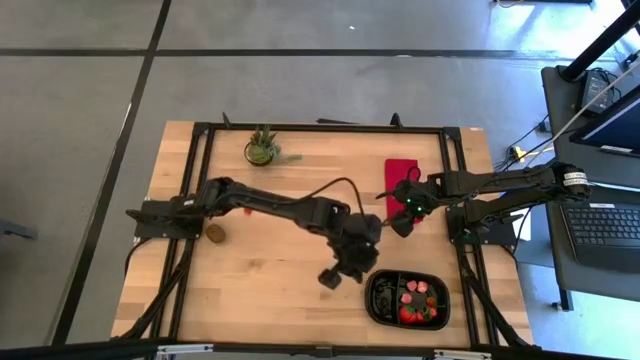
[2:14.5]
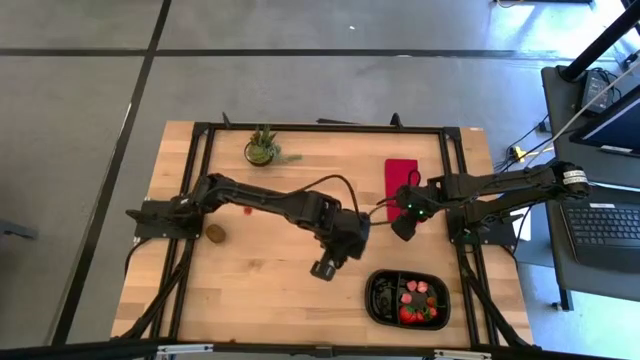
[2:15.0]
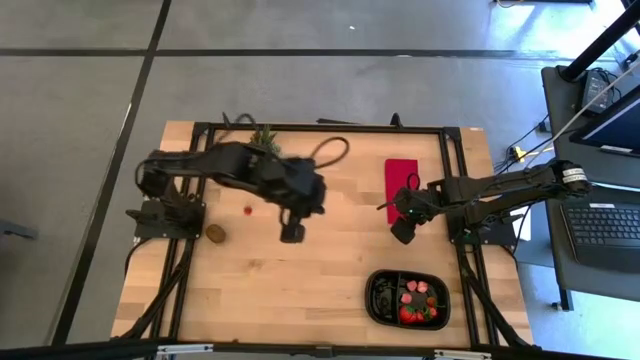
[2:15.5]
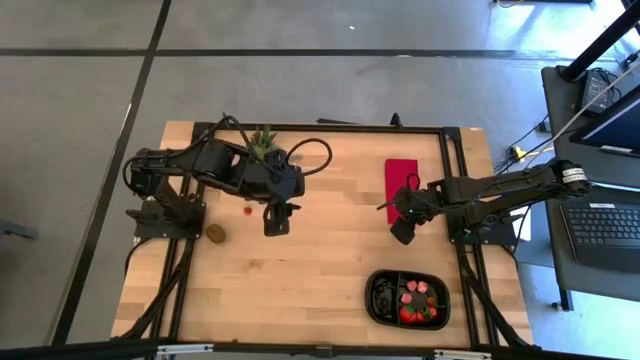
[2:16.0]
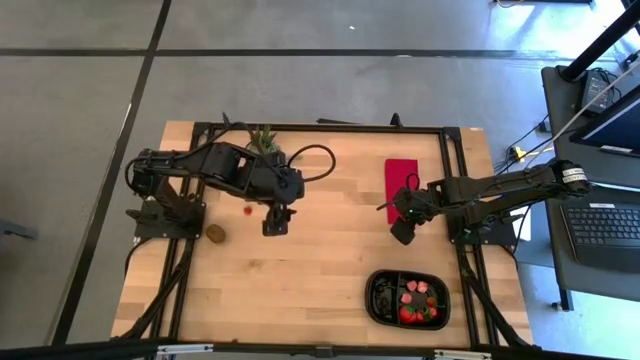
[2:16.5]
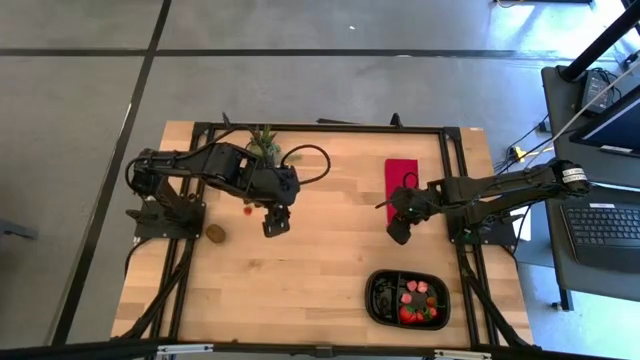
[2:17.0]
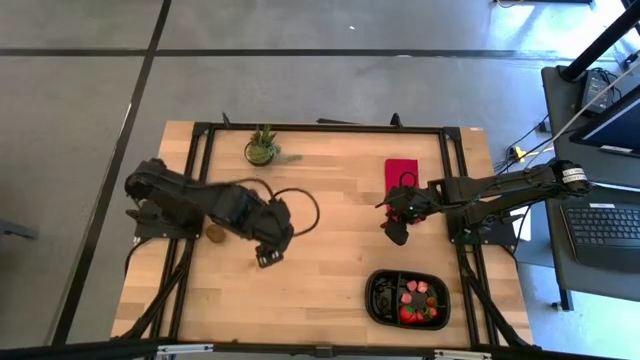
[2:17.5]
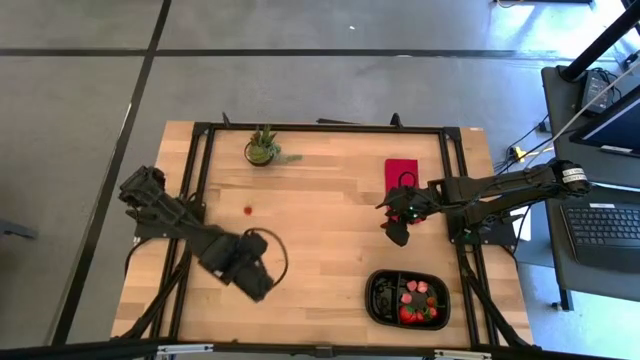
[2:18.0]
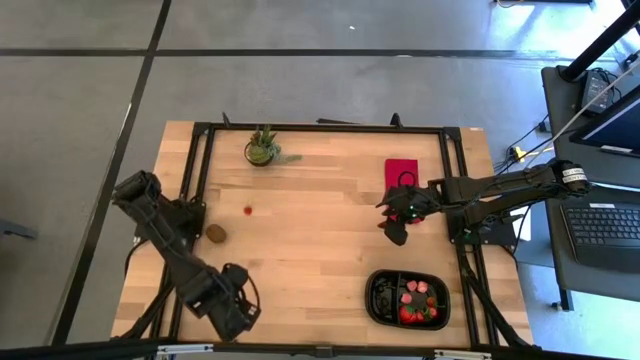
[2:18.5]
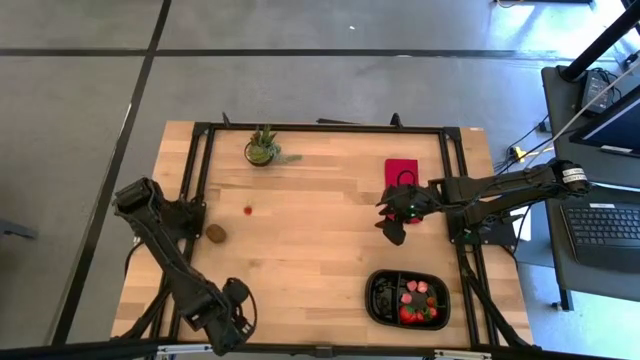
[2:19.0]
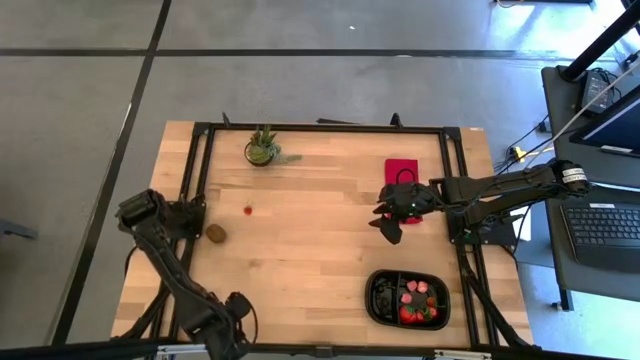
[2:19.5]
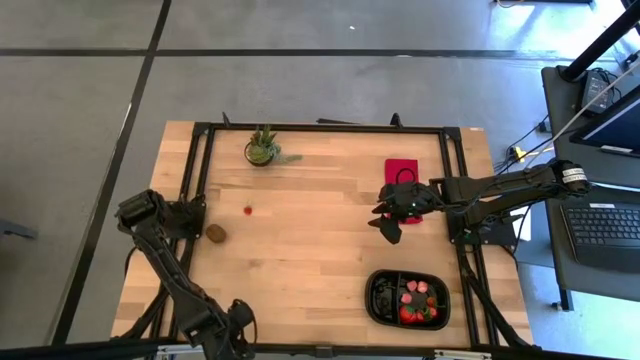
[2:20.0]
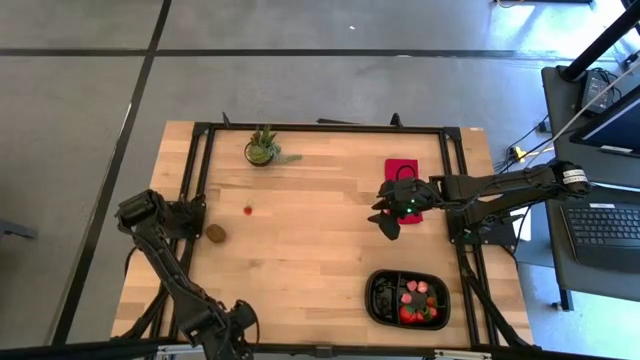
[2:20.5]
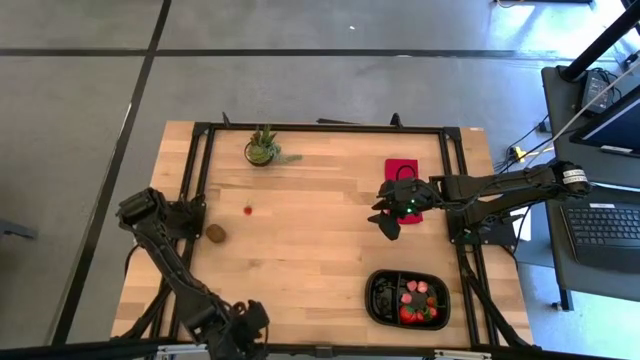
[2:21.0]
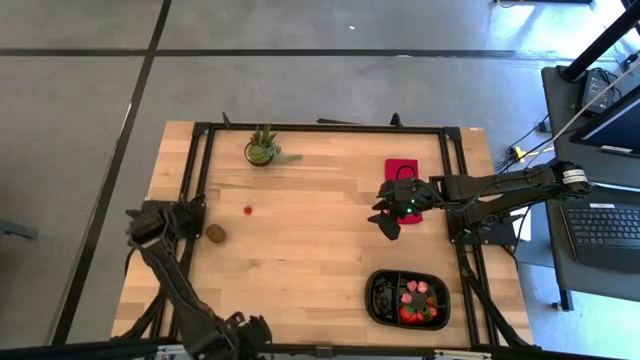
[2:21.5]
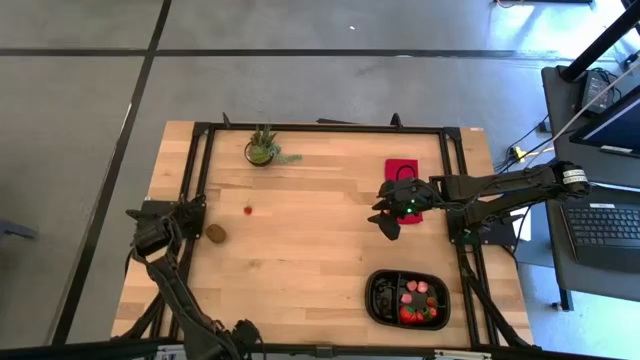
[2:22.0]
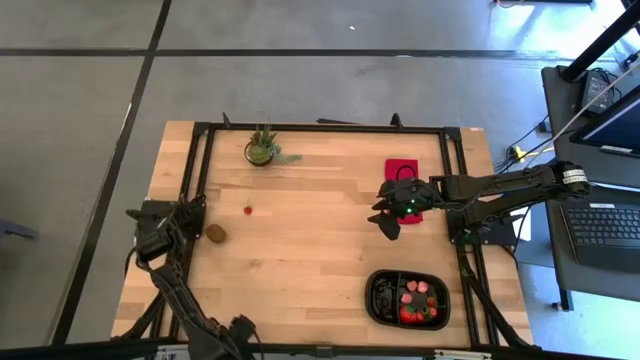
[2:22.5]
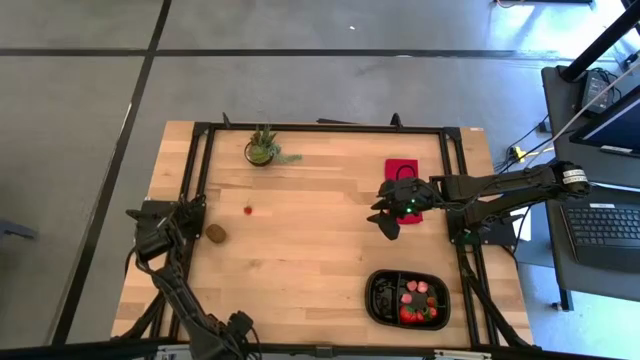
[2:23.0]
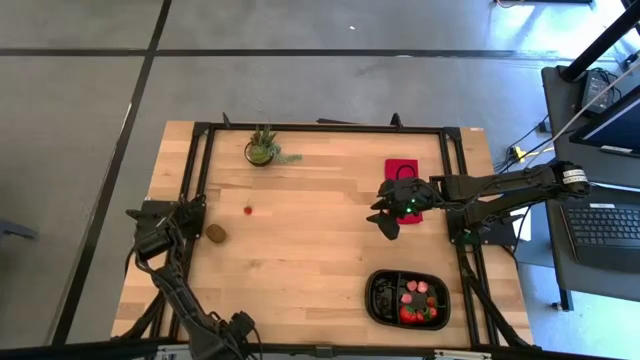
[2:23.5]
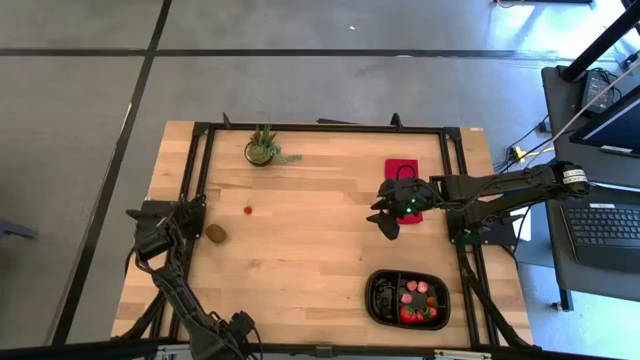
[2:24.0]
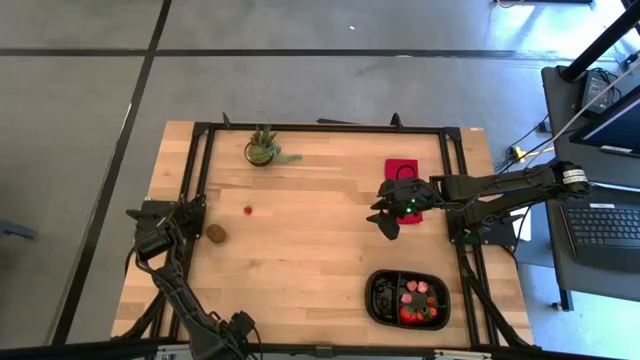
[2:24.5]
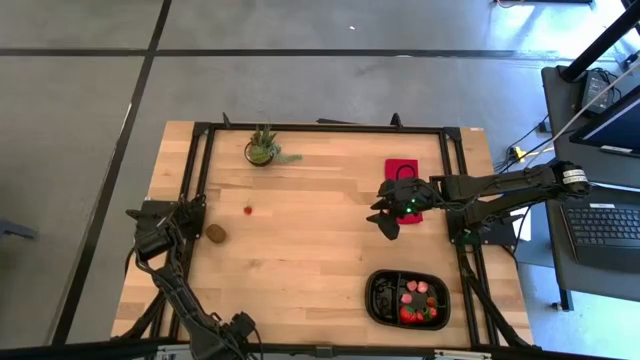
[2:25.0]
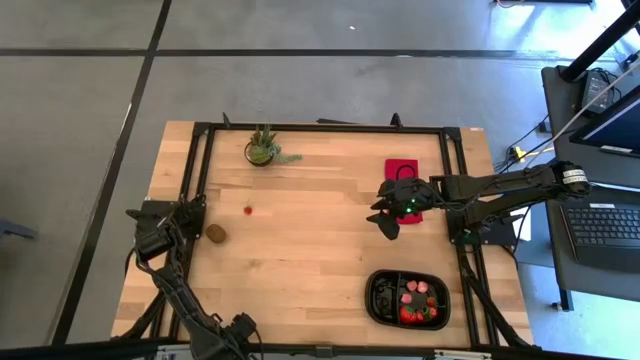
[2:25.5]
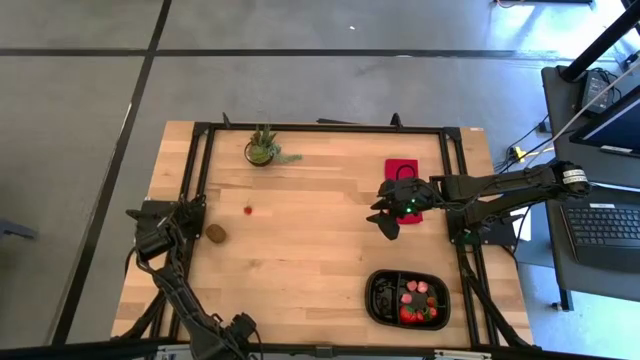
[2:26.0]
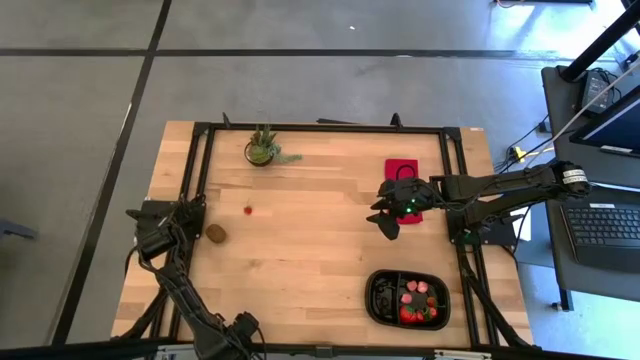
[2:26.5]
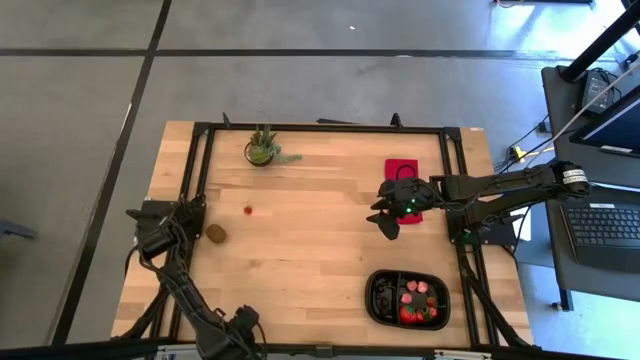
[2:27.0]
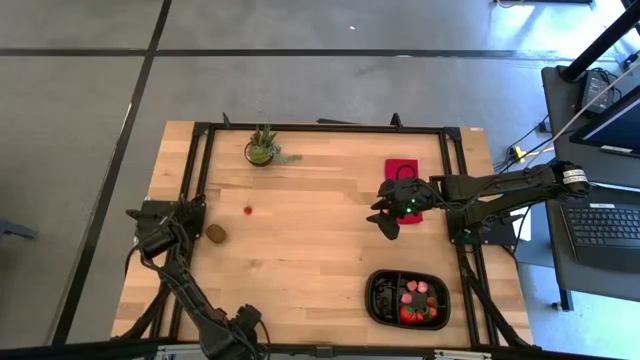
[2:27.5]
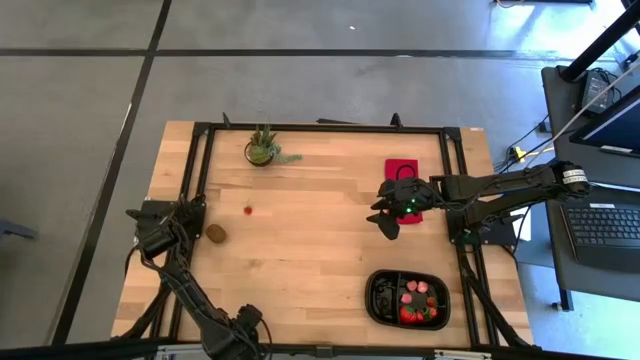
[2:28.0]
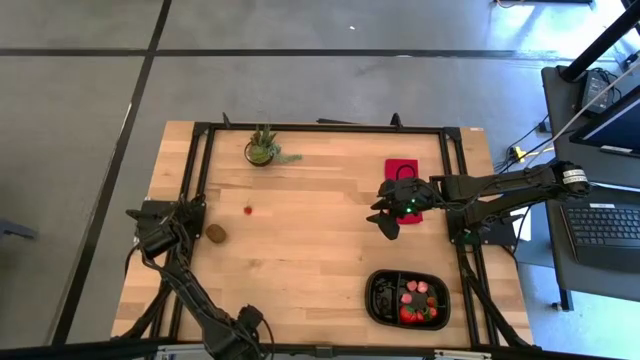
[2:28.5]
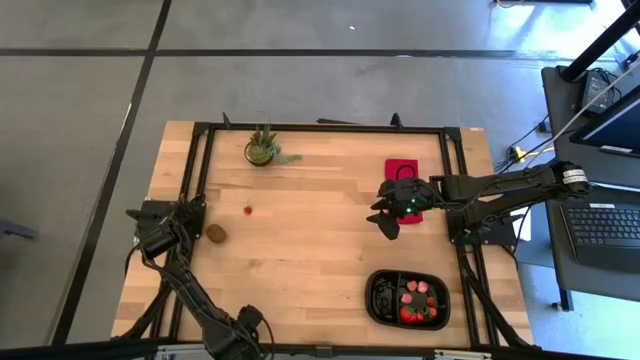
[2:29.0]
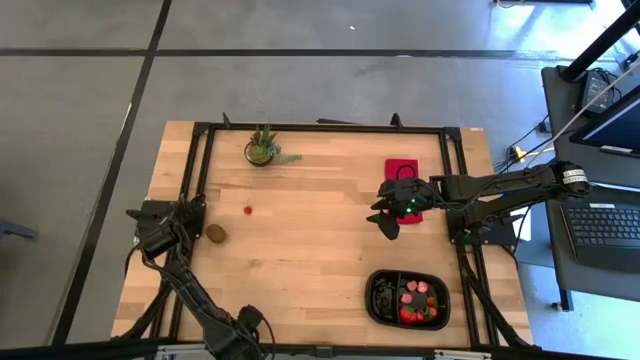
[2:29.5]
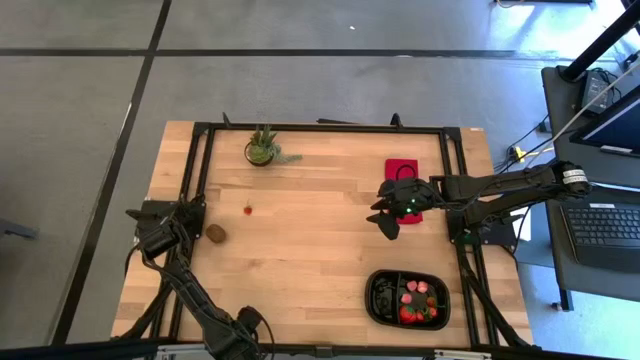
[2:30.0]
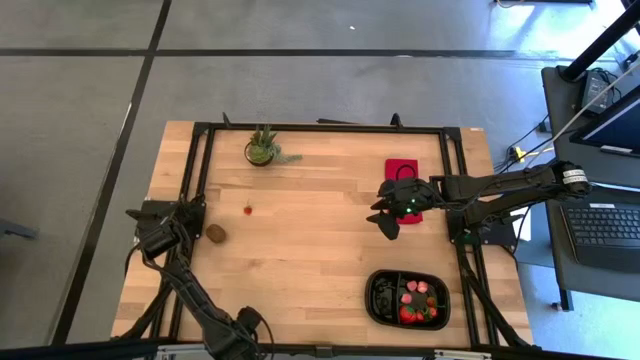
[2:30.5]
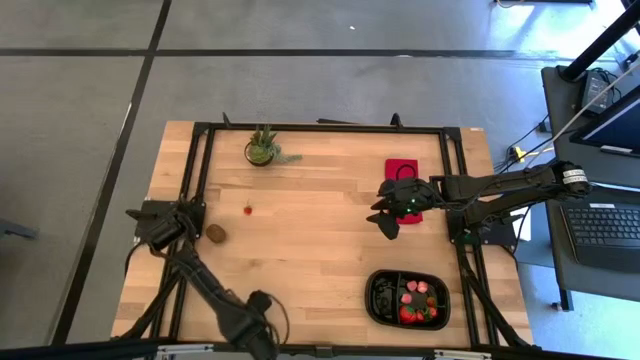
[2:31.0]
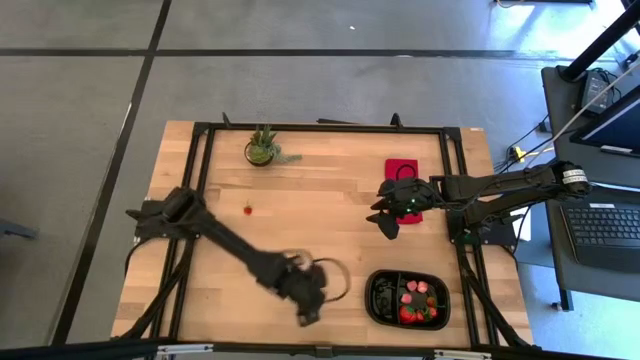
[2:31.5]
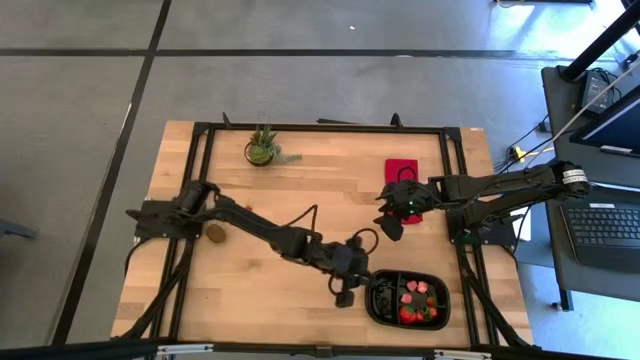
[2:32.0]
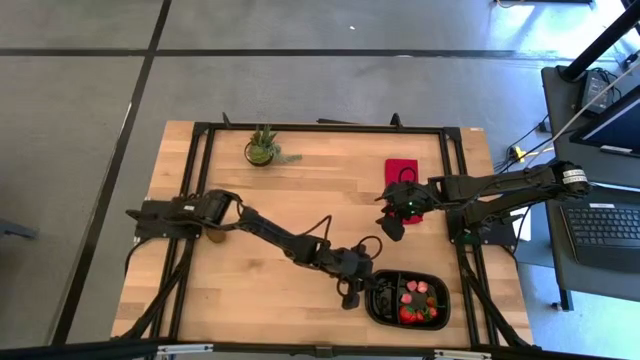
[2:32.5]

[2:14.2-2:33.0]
Task: Pick and placing Produce into tupperware
Put the blueberry into the left black bin
